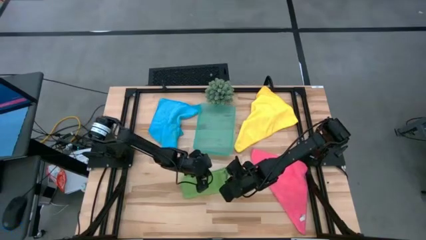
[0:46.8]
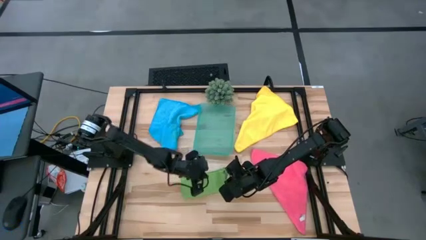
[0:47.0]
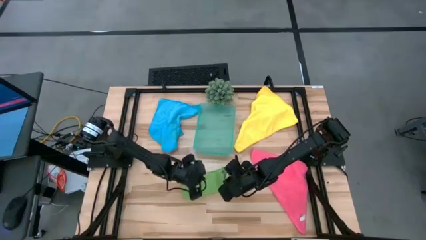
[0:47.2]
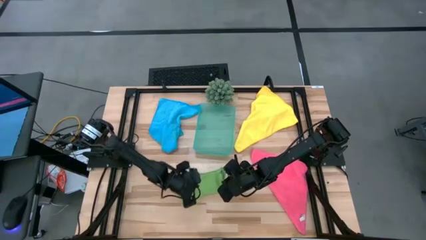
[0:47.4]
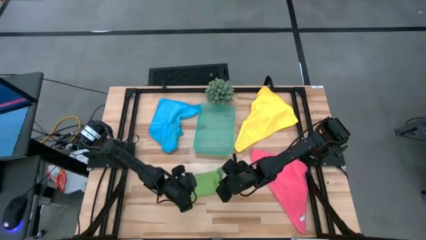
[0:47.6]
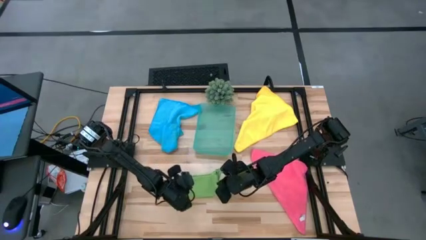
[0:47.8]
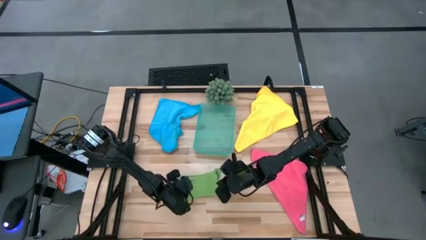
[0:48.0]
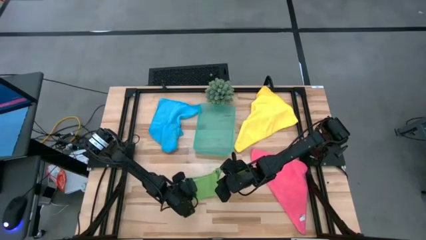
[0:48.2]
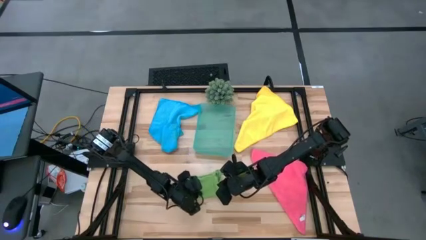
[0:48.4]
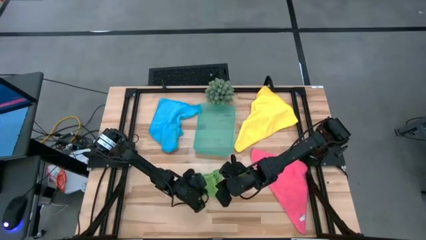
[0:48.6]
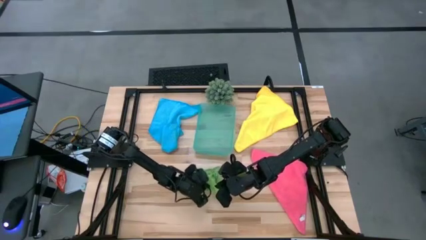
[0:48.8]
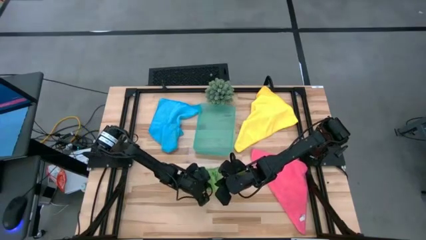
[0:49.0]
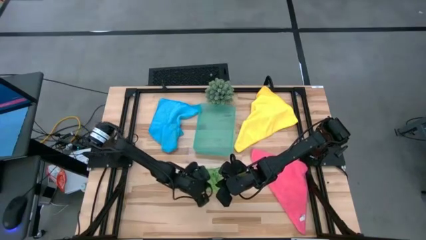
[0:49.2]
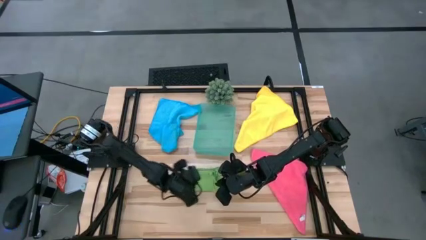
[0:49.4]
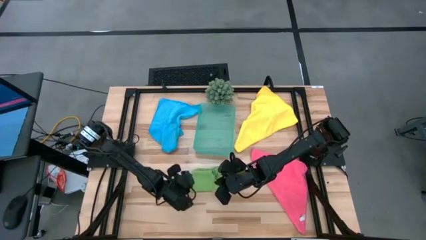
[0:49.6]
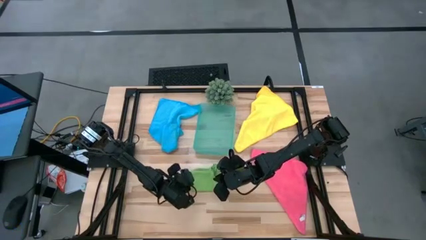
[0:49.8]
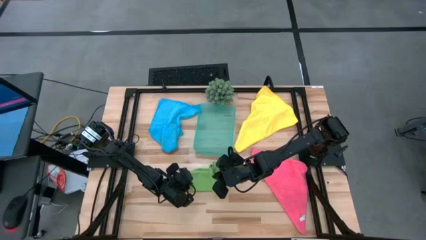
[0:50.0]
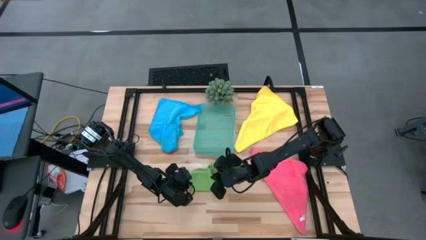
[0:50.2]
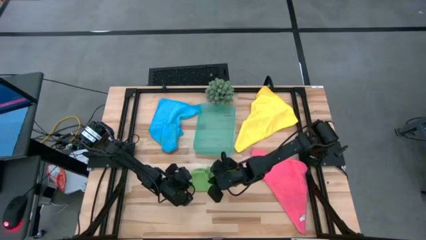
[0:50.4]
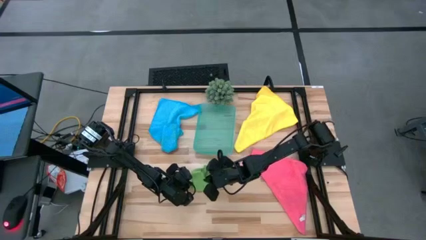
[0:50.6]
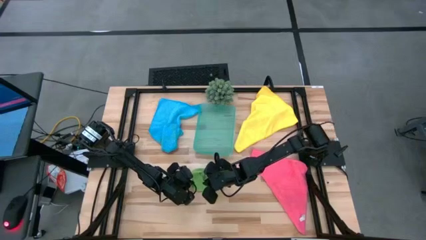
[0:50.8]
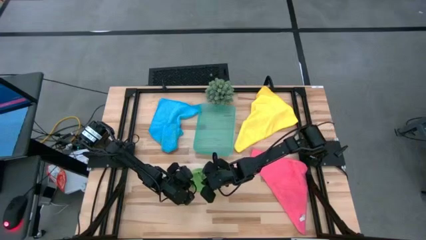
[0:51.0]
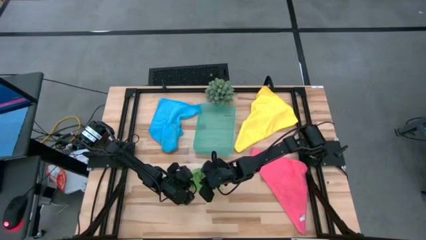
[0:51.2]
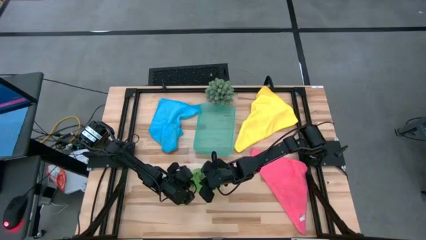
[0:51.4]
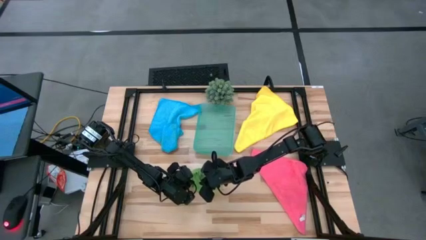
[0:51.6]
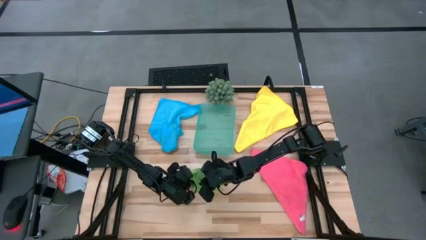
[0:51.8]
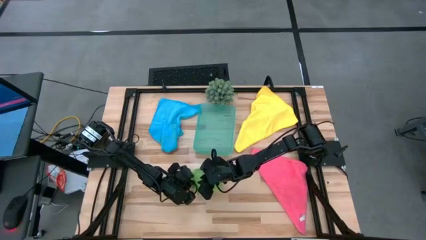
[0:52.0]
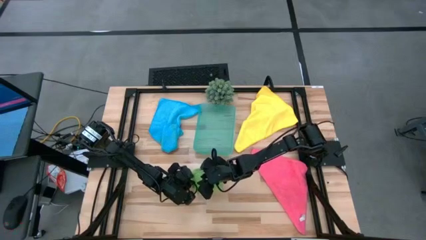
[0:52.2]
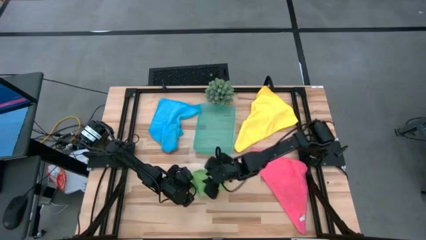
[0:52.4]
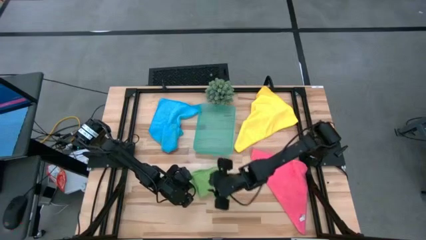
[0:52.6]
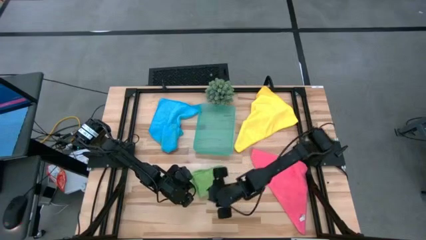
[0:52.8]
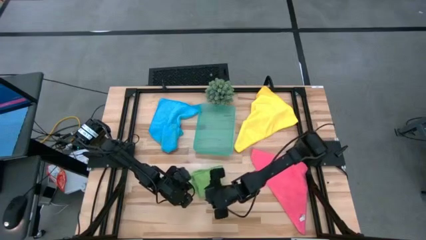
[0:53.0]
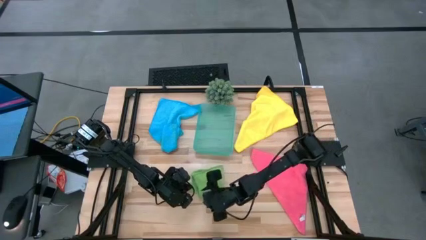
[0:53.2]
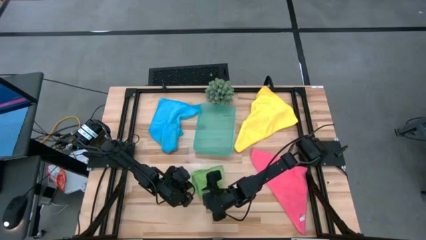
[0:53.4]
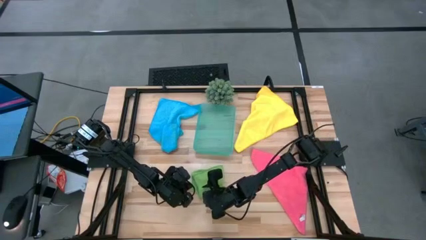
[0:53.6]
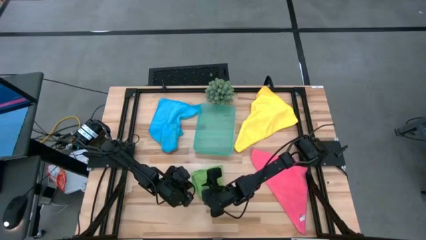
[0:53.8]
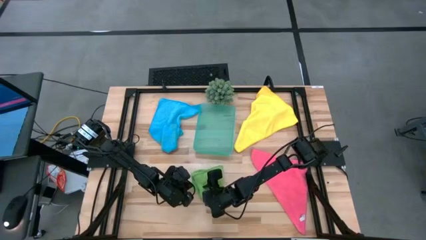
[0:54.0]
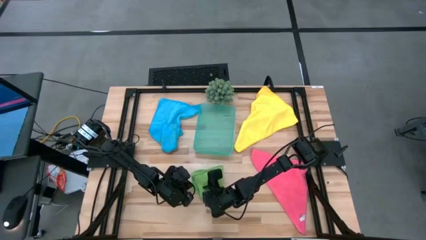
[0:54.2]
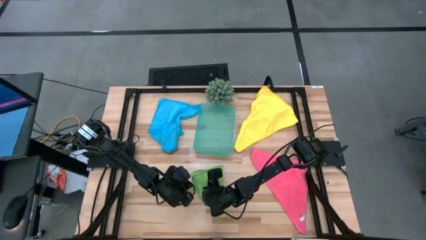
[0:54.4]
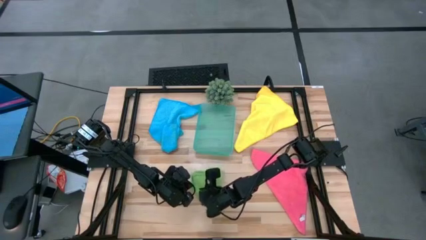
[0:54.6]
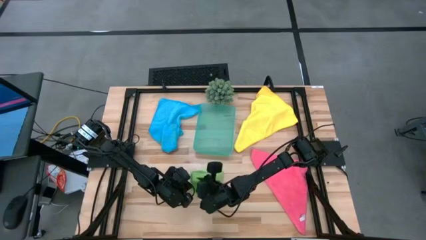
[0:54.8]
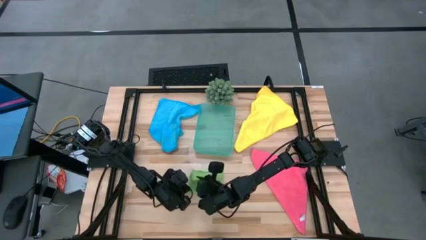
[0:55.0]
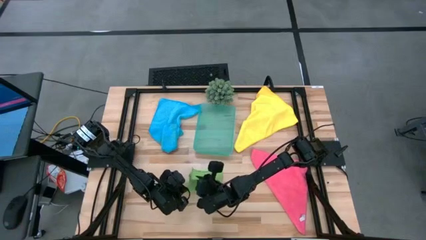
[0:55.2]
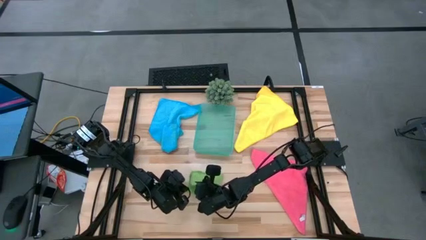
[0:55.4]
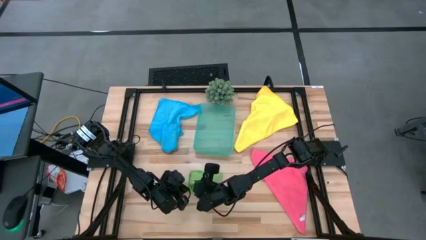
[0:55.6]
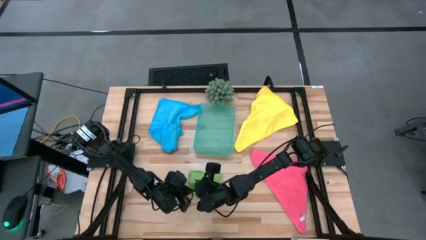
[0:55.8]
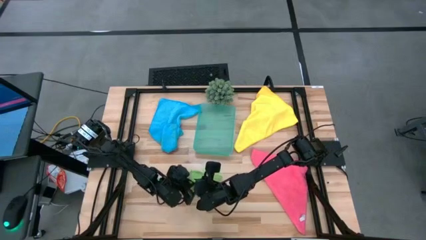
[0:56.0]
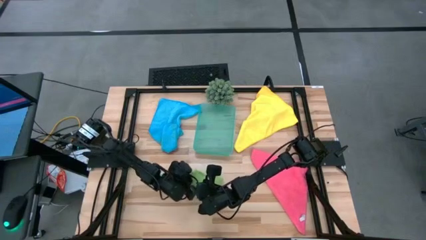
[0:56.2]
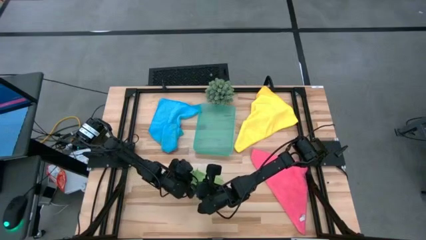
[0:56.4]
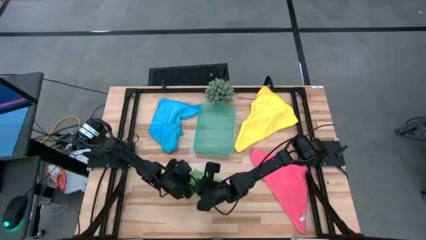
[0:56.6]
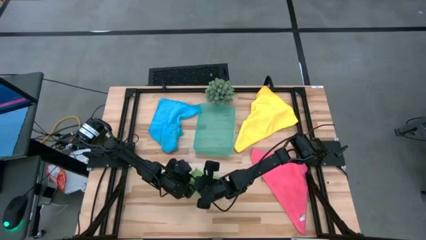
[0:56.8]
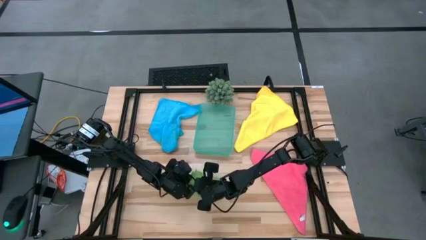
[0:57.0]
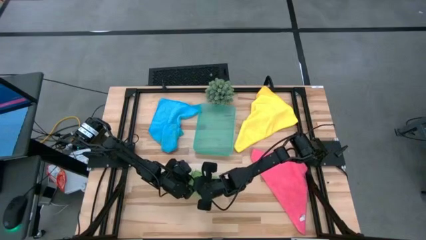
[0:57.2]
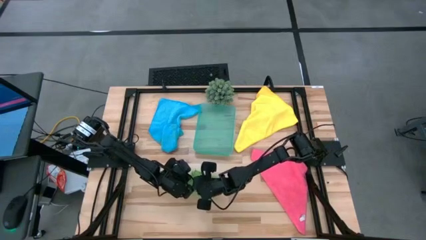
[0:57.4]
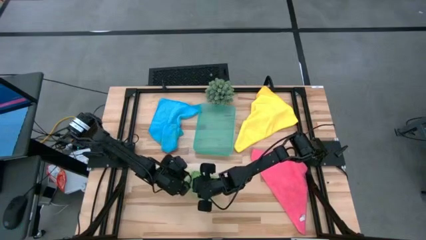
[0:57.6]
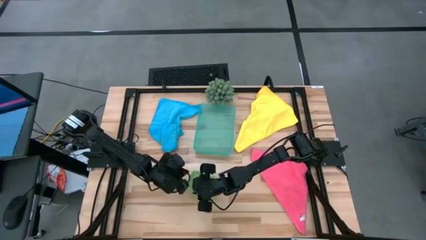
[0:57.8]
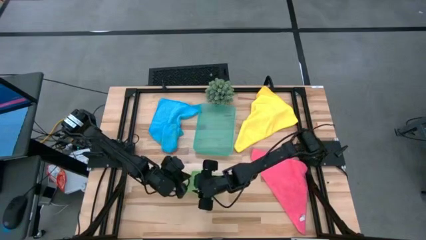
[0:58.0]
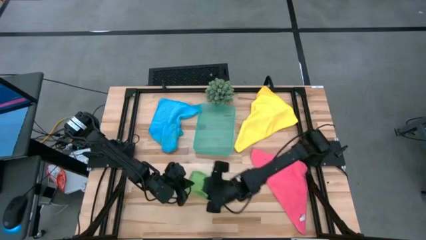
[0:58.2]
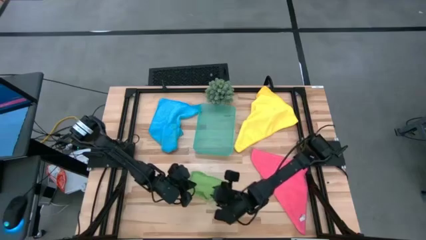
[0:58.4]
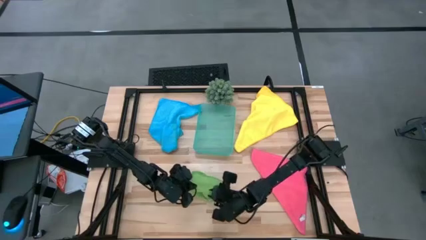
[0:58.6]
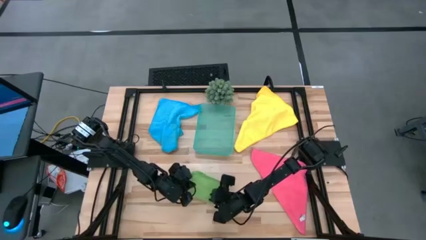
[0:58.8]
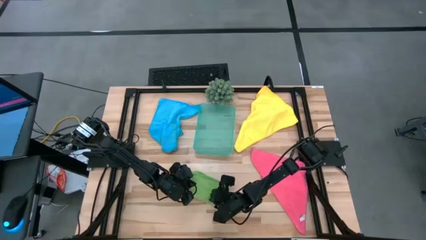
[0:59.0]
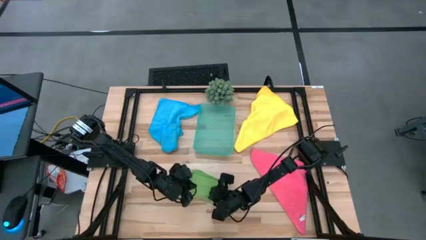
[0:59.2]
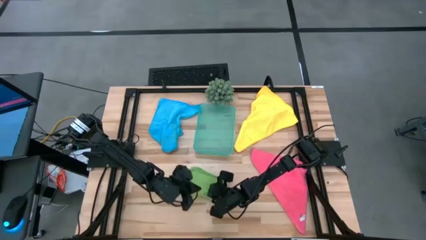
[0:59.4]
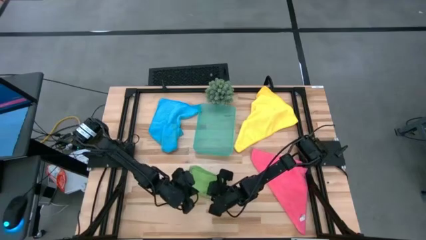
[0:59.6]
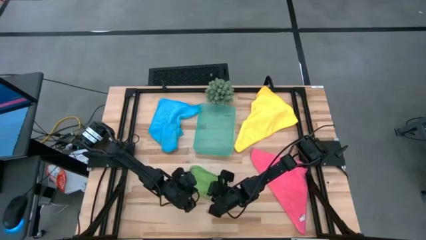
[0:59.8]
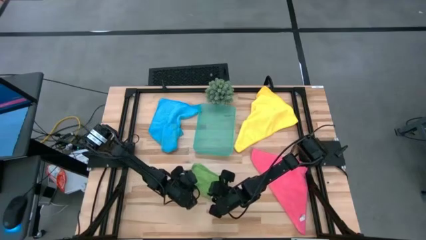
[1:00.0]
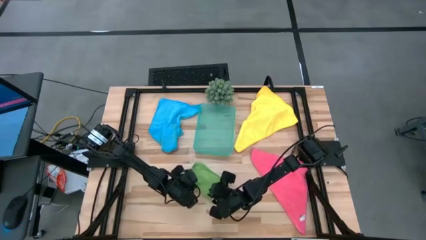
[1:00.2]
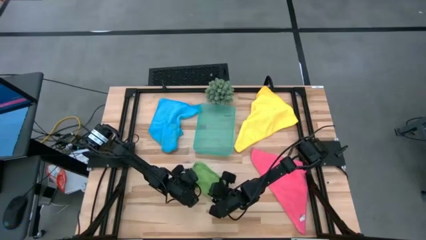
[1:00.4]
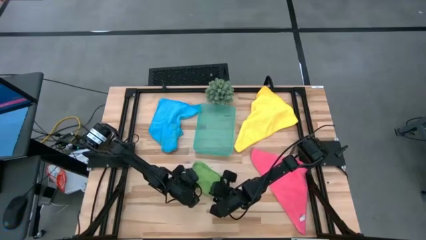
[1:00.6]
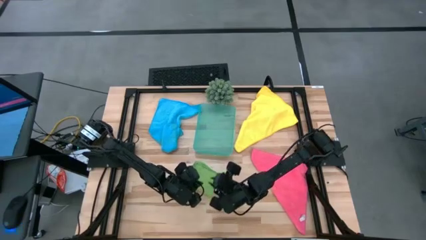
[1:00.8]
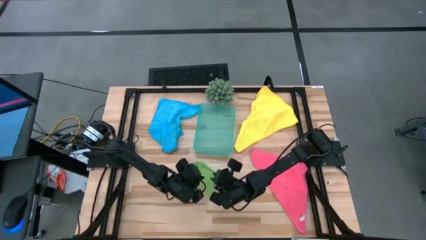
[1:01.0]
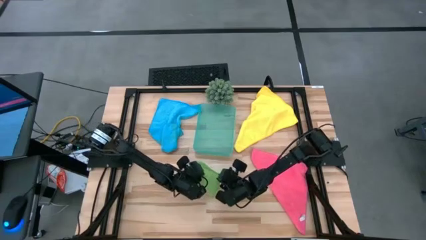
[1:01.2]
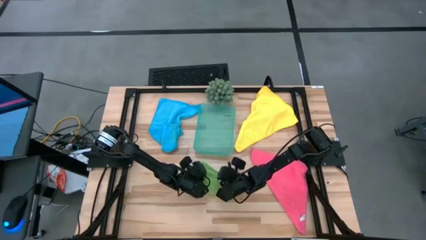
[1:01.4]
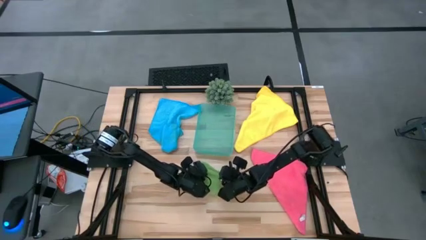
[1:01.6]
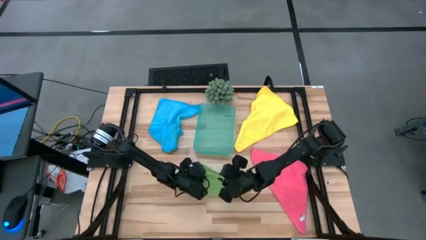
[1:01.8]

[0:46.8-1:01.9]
Task: Fold microfiber towels
Fold the green micro fiber cloth

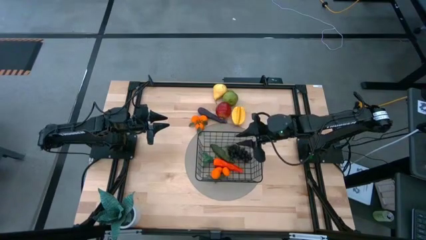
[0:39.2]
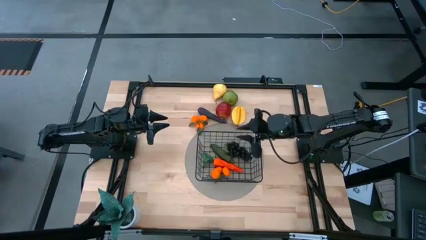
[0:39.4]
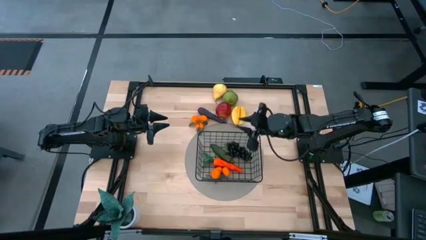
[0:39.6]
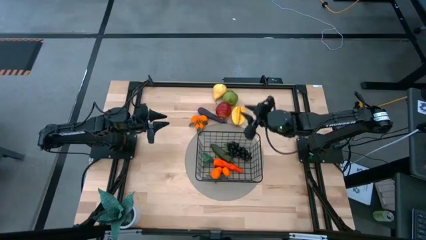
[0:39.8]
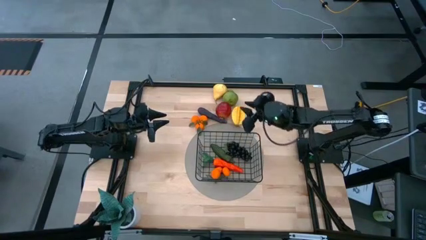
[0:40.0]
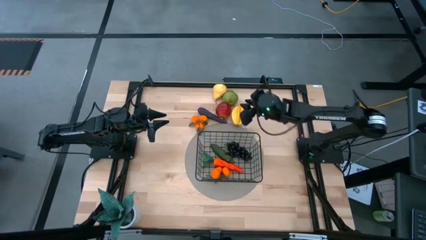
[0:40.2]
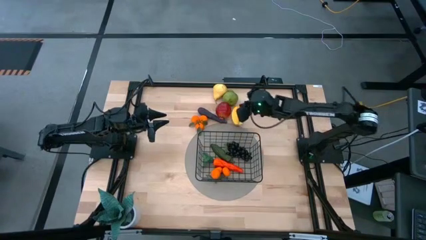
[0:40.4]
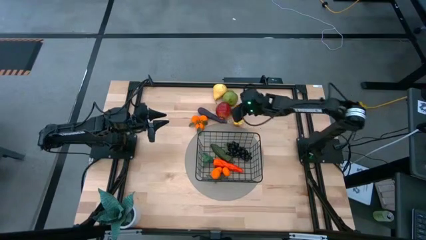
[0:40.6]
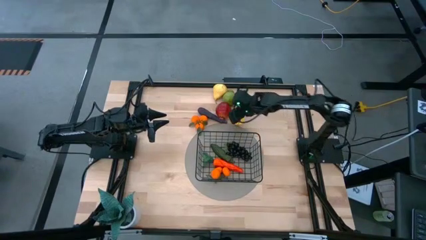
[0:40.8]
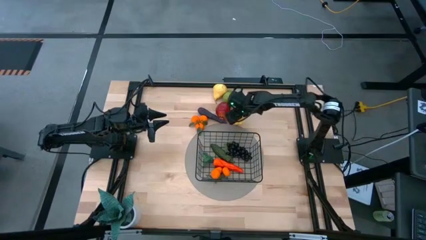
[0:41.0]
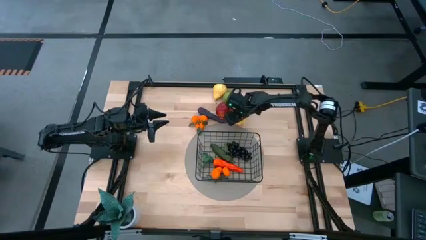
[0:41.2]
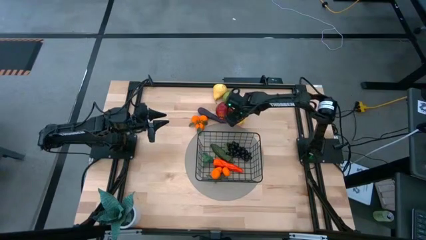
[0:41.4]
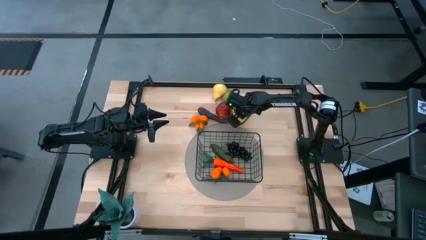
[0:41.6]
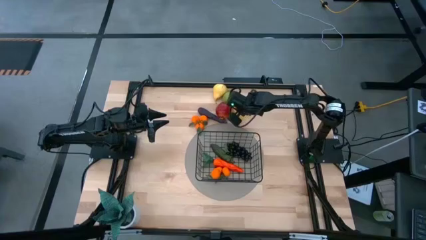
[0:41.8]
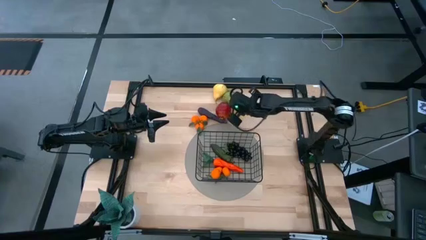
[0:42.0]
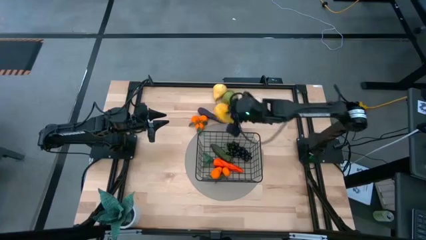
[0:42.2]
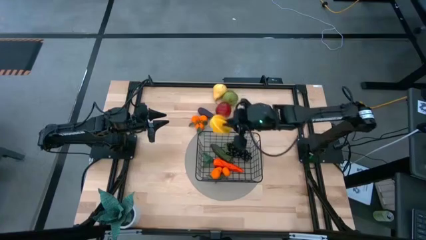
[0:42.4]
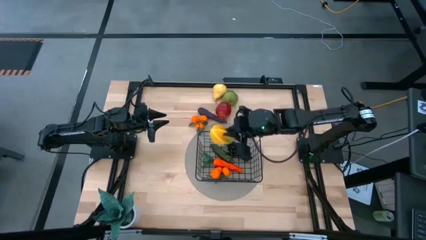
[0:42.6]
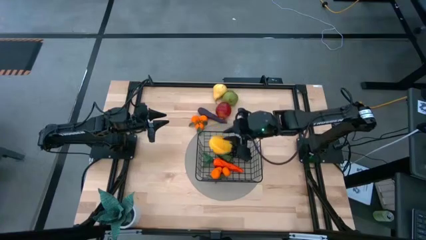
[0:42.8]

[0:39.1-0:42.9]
Task: Build produce basket
Put the starfruit into the wire basket
